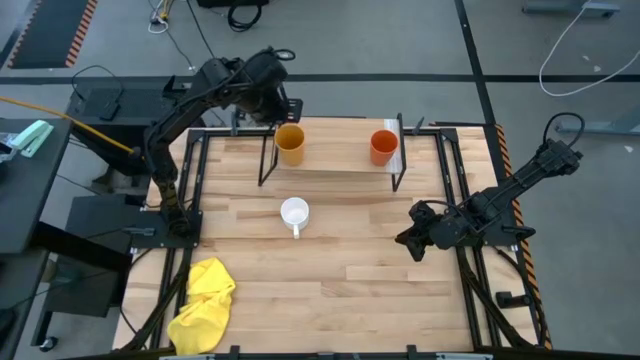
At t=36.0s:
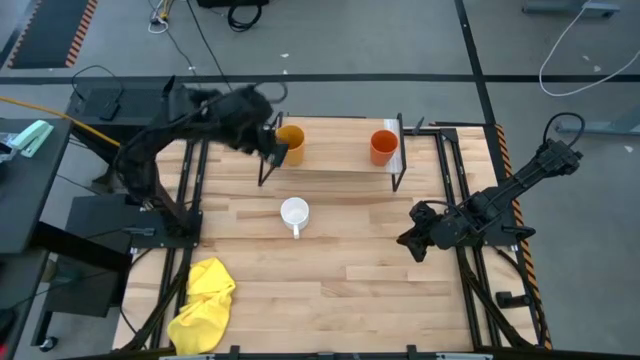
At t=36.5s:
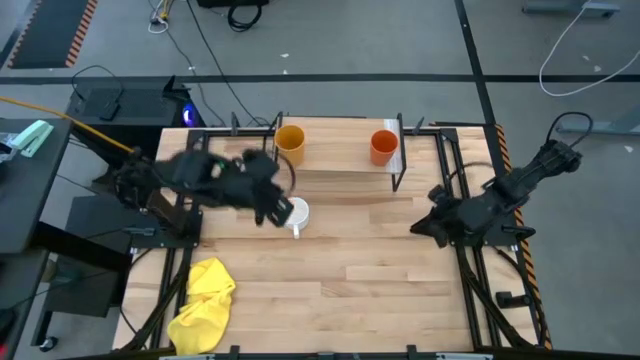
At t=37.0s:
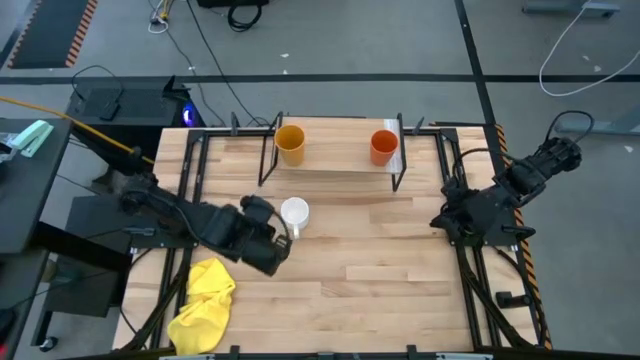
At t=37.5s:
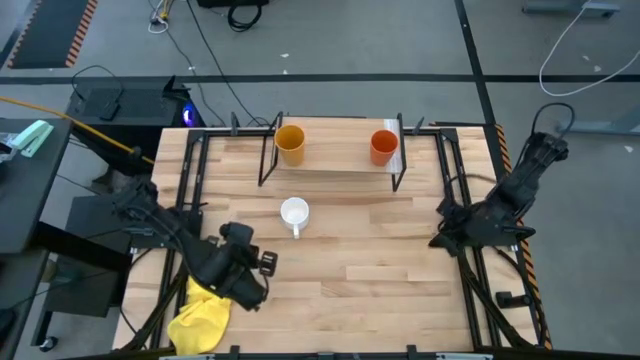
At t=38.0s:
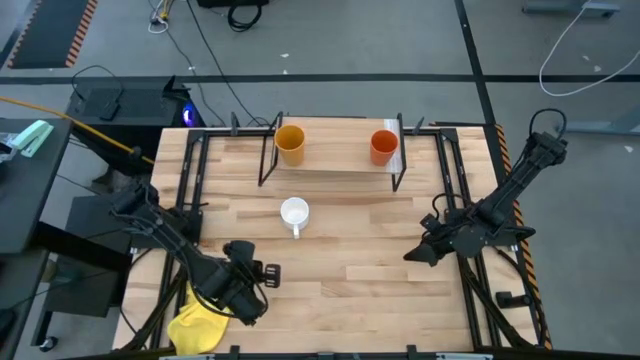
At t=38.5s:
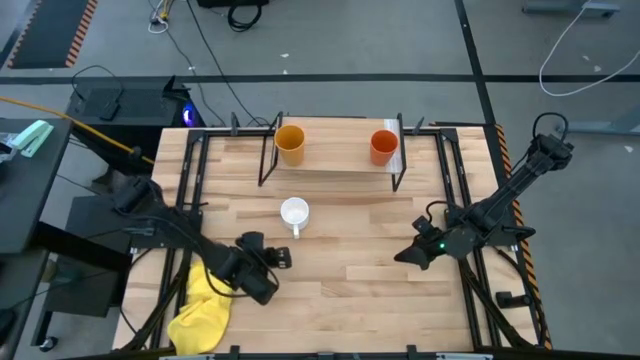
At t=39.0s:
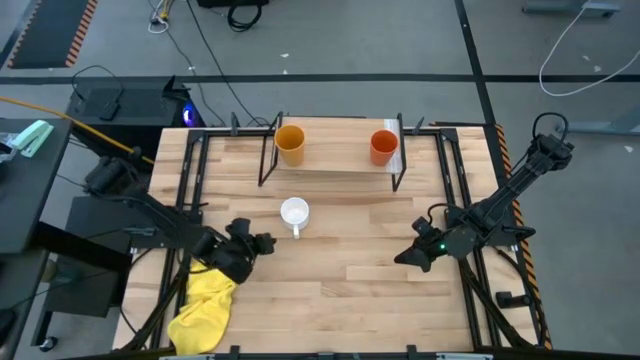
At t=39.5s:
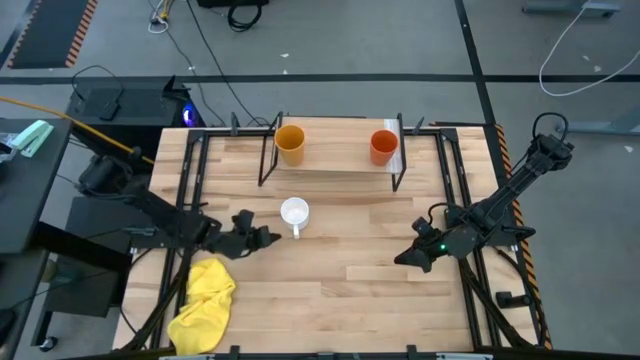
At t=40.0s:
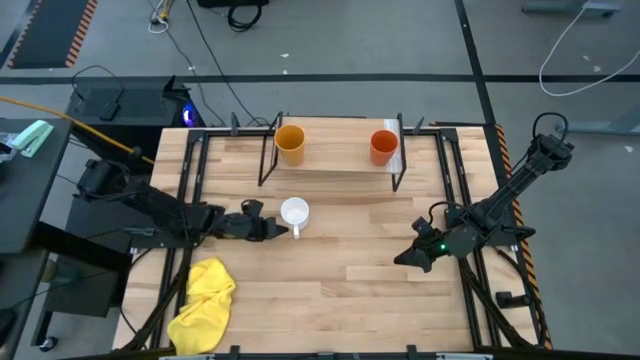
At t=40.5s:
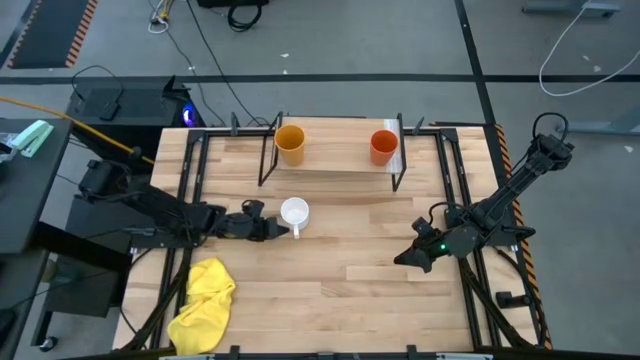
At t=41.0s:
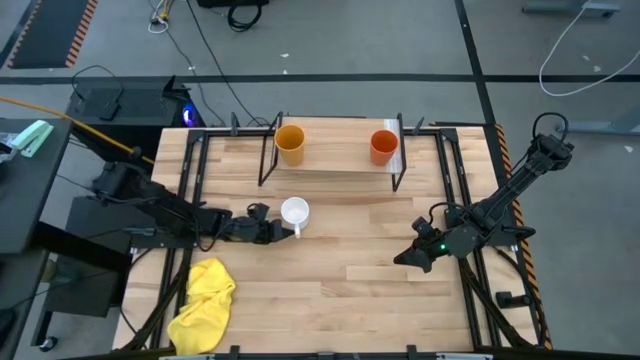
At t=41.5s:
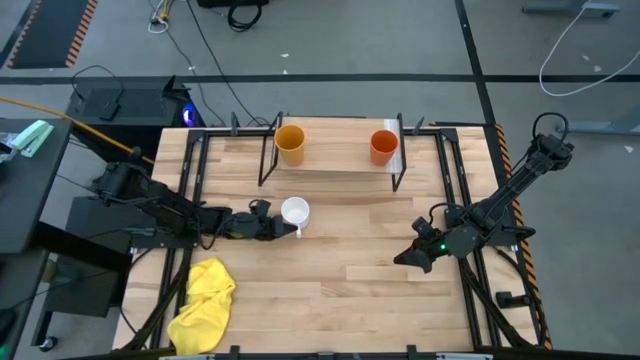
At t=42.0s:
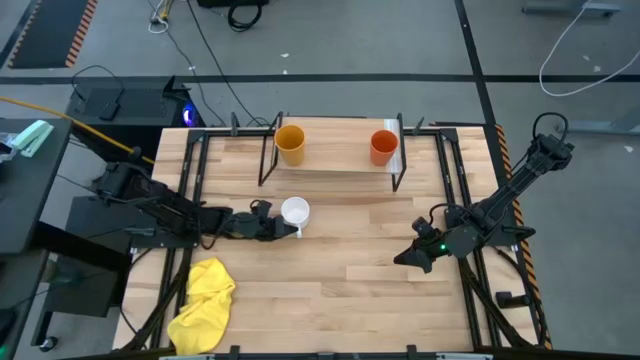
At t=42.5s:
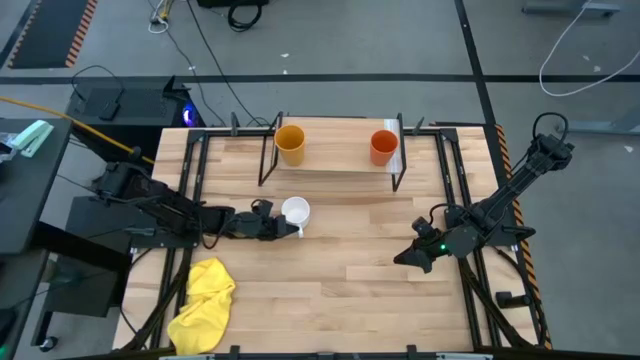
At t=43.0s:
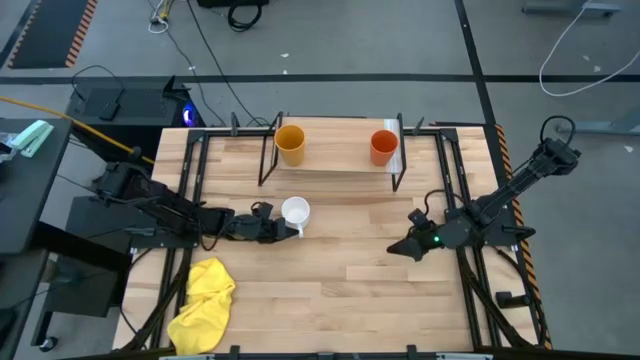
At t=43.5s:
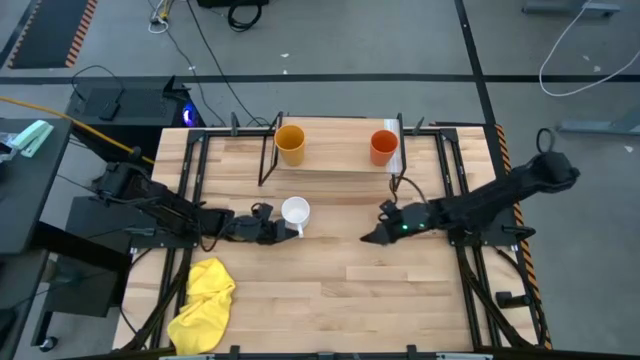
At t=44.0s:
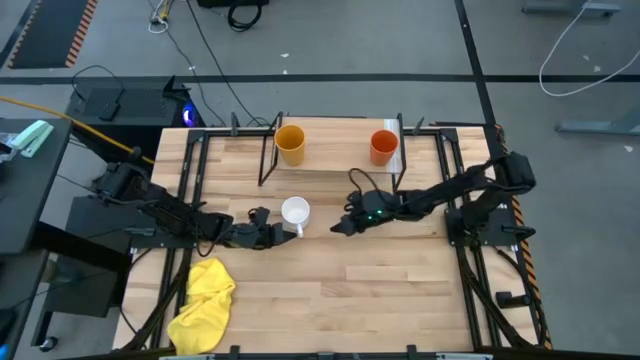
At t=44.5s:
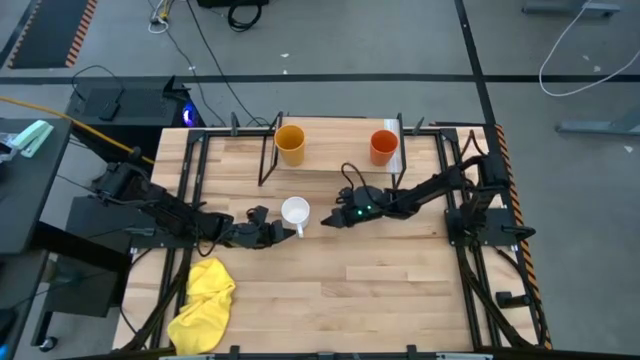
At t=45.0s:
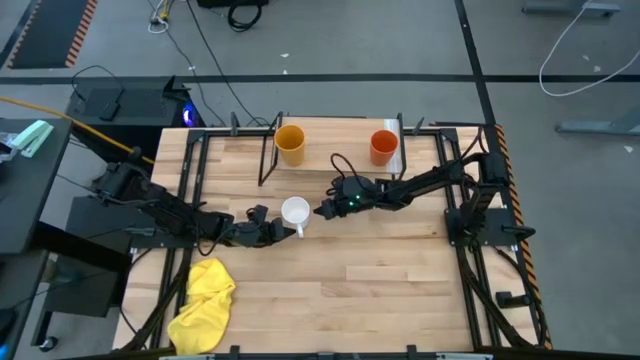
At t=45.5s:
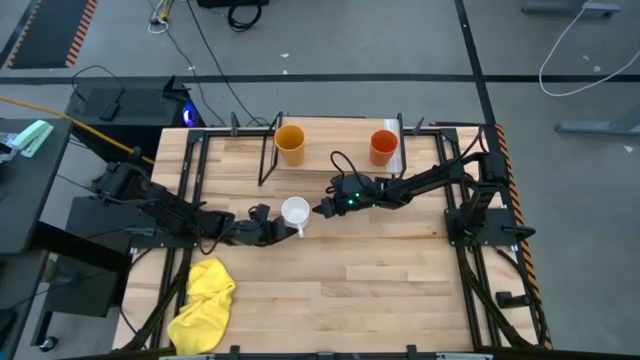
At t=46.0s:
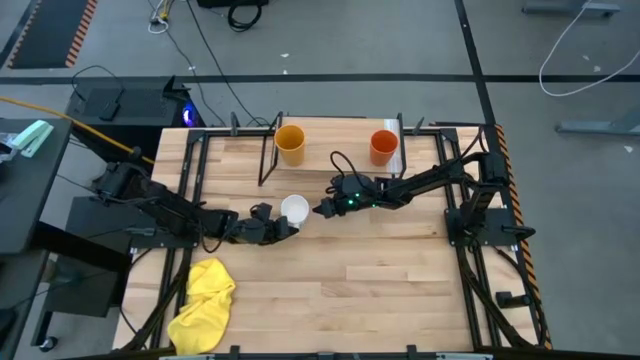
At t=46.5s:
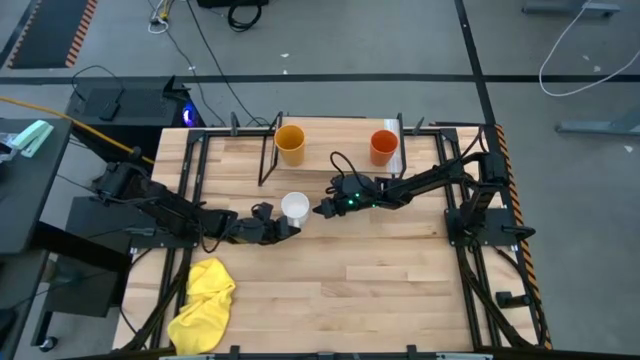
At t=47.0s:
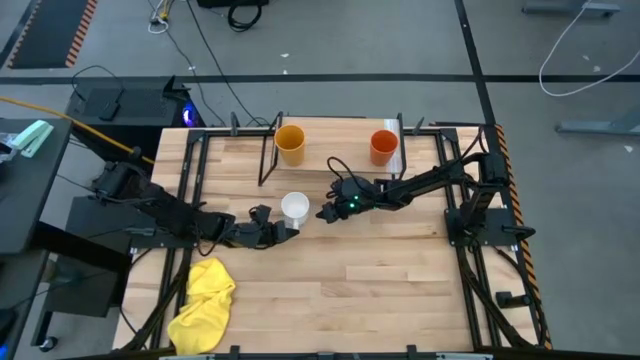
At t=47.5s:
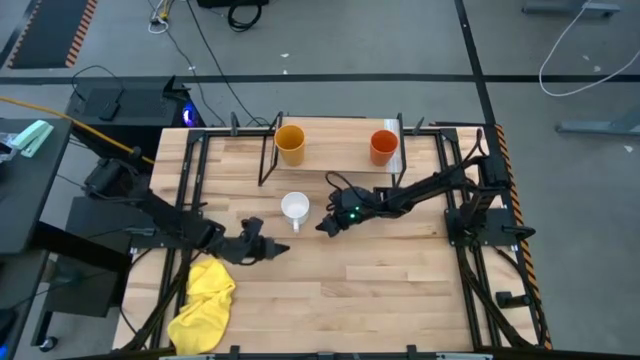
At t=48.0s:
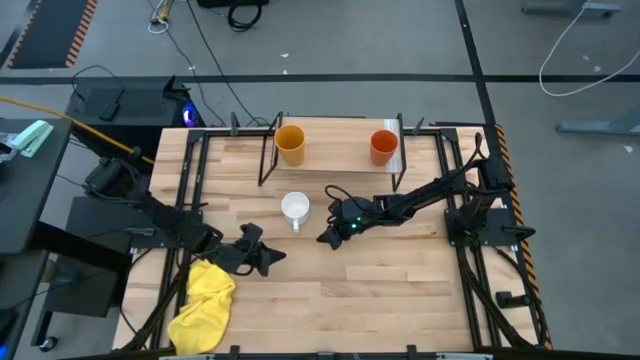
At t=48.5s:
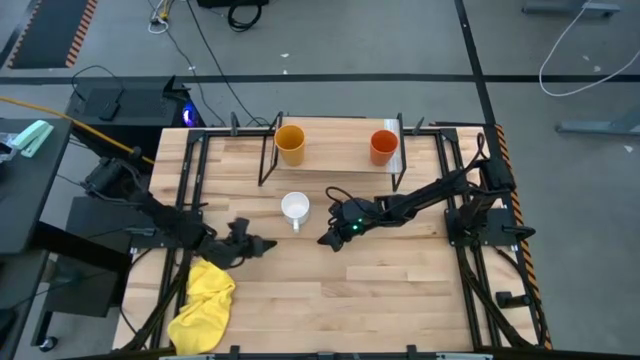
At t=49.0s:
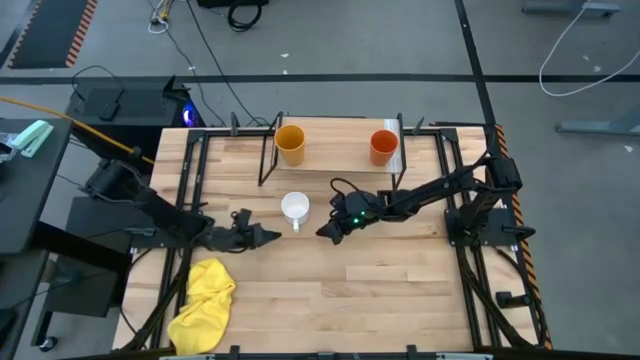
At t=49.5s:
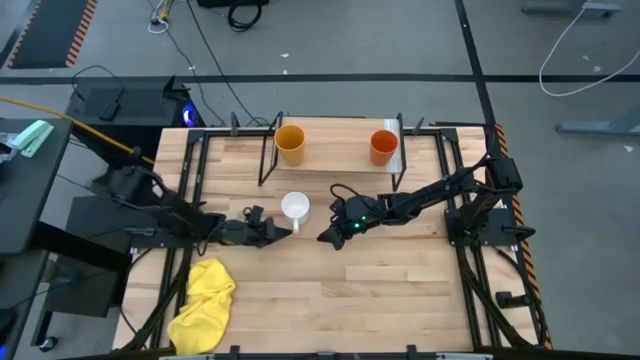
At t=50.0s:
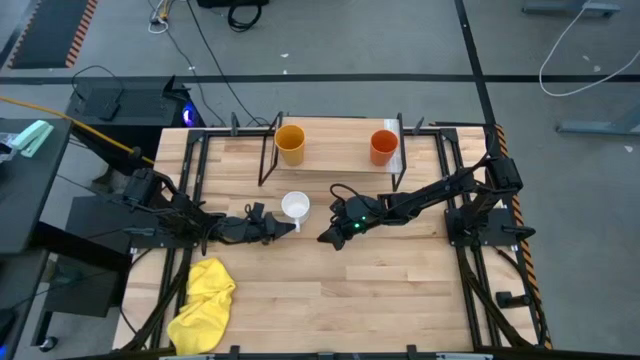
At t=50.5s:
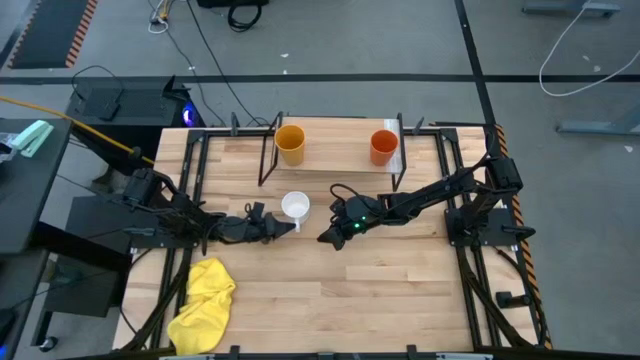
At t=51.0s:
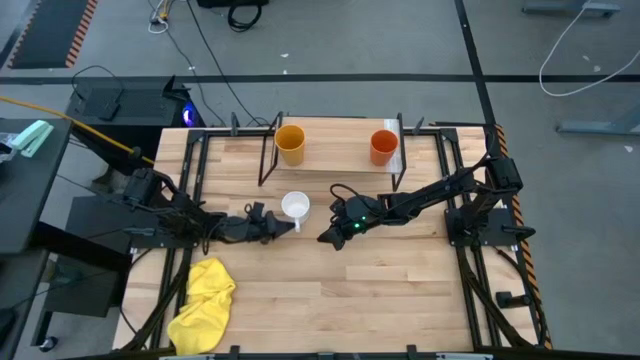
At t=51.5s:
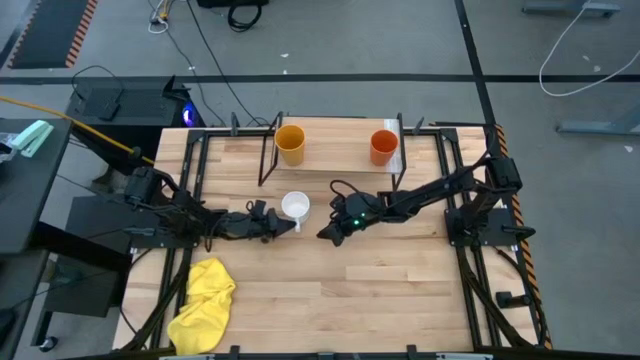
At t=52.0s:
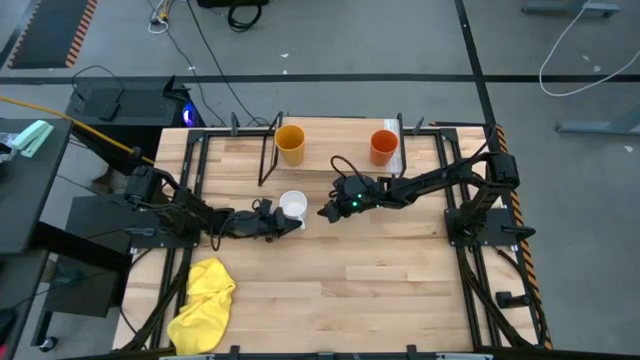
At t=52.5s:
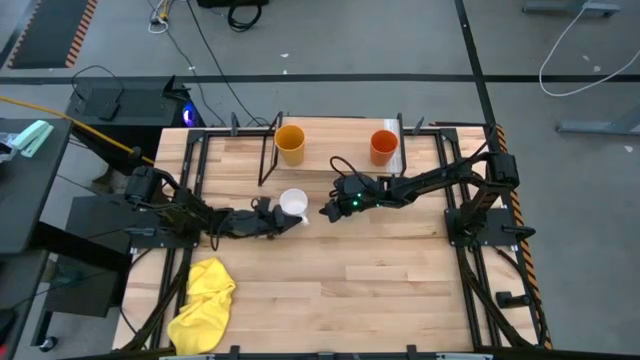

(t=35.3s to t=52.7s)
Task: Stack small to large cups/mugs on shelf
Put the white mug on the shelf

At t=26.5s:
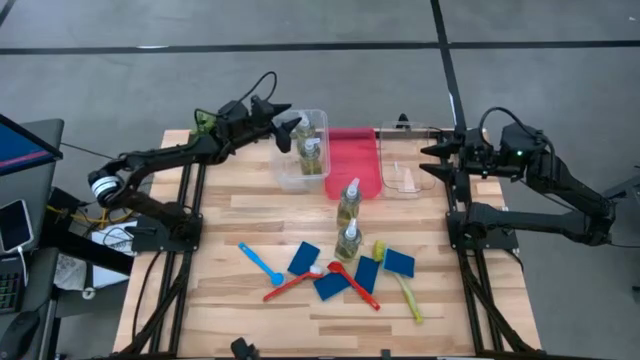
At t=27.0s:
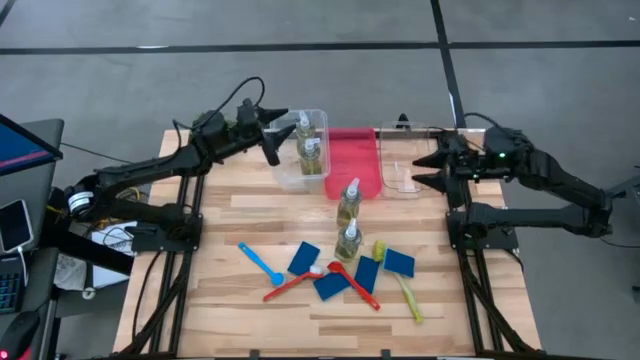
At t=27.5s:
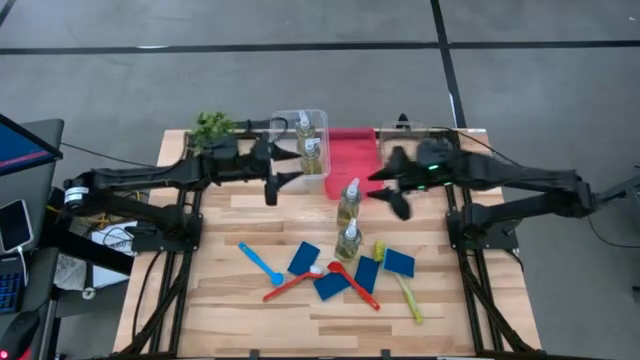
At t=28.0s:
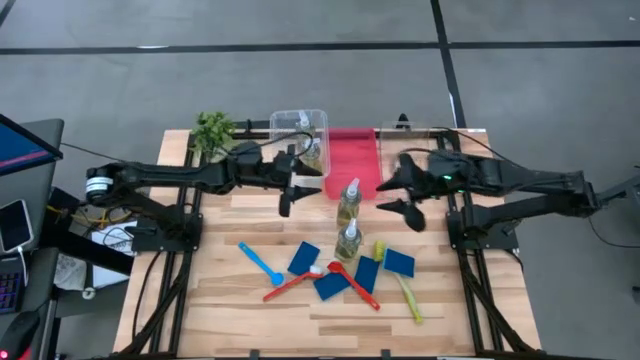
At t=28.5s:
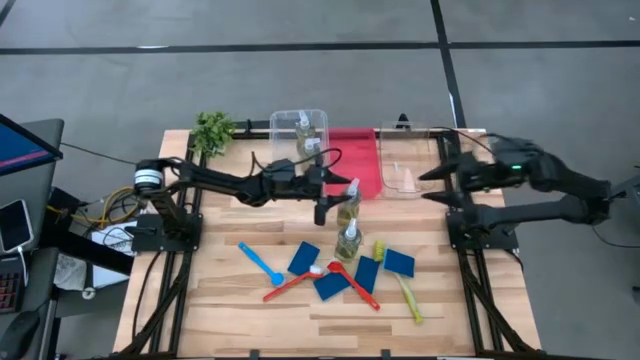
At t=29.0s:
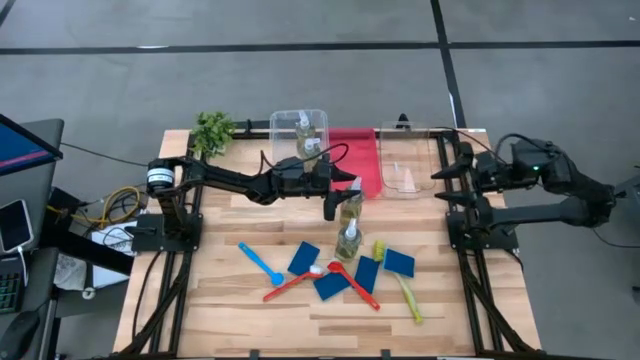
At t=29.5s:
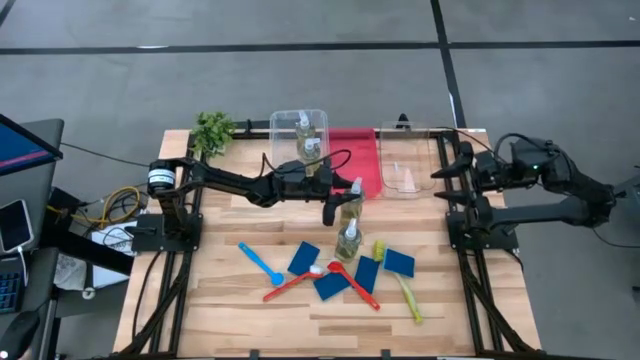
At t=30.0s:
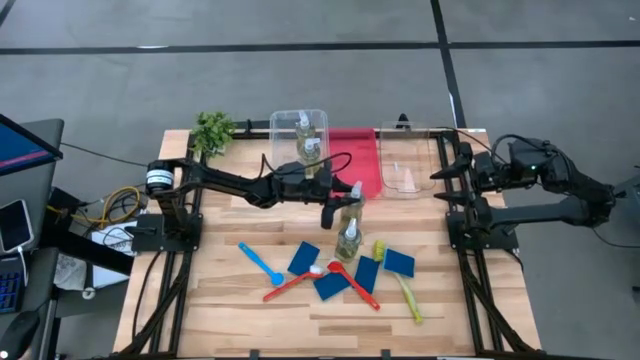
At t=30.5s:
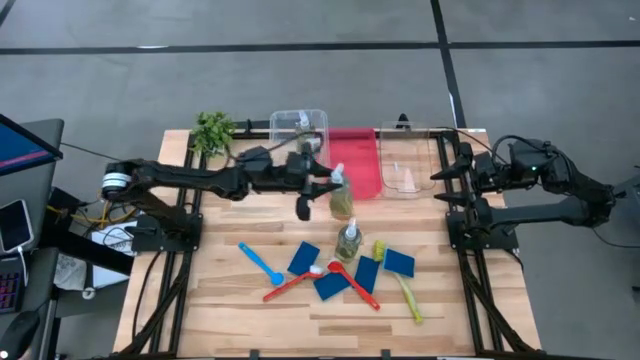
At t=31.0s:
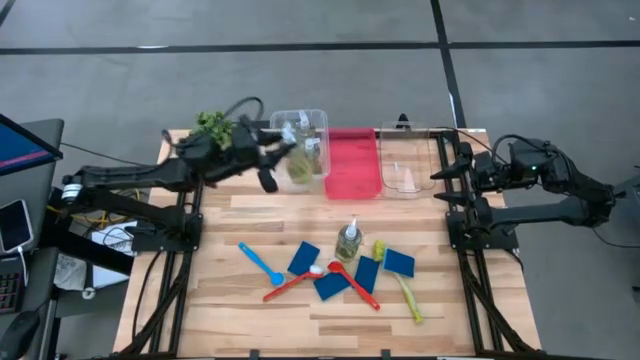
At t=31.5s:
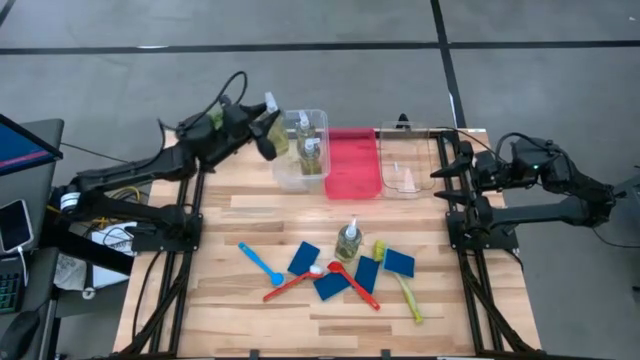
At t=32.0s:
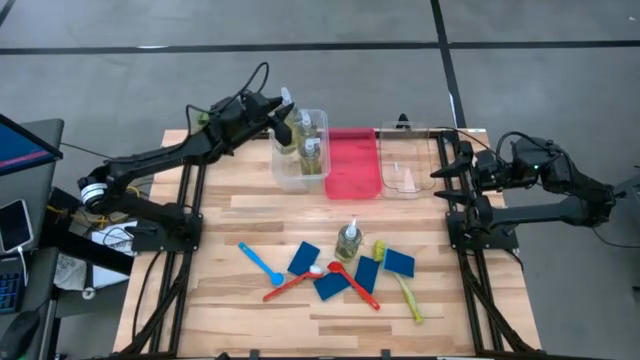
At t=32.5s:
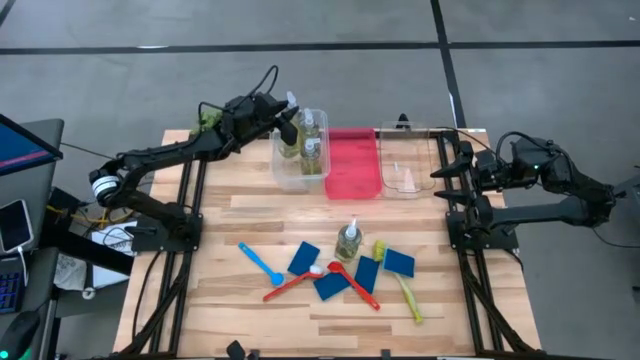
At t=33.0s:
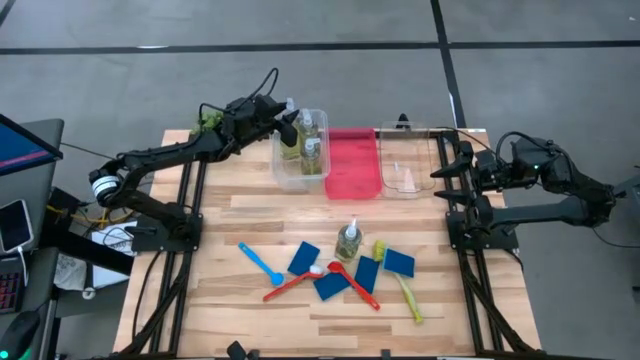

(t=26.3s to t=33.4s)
Task: Pick & Place Kitchen Sink Supplies
Put the transparent soap dispenser into the transparent container
